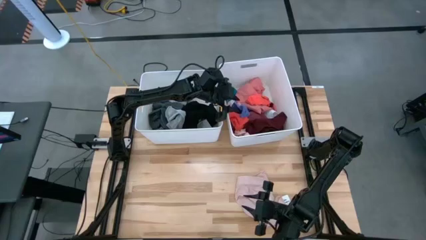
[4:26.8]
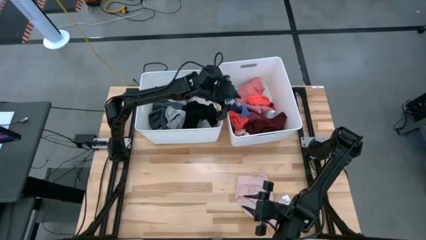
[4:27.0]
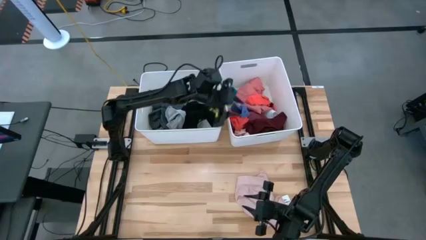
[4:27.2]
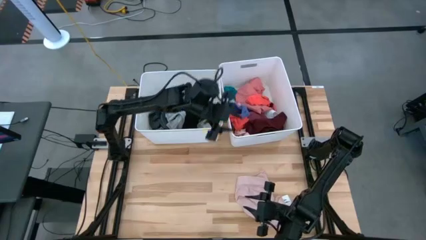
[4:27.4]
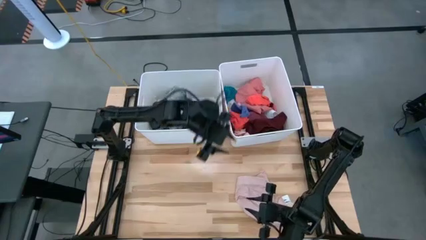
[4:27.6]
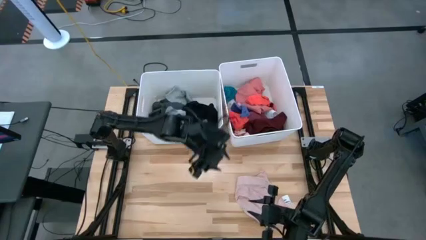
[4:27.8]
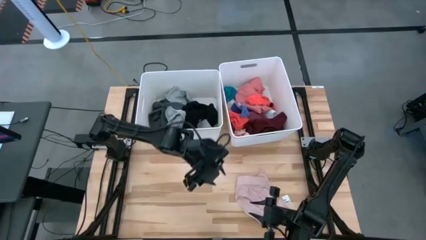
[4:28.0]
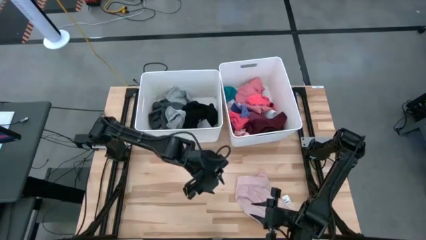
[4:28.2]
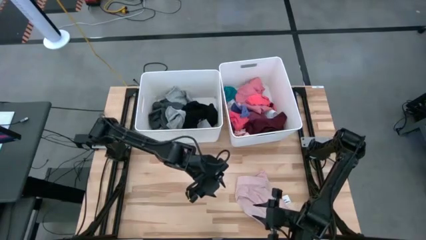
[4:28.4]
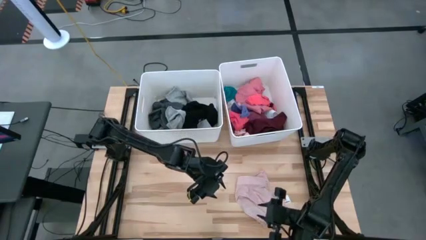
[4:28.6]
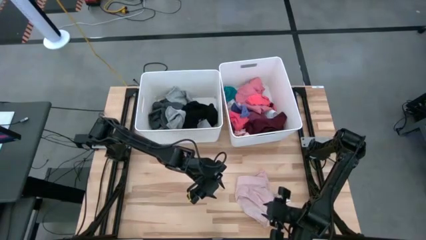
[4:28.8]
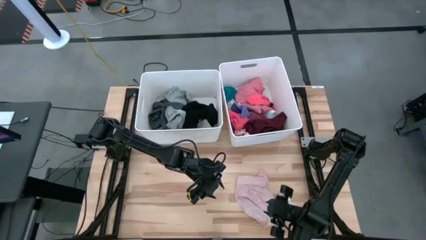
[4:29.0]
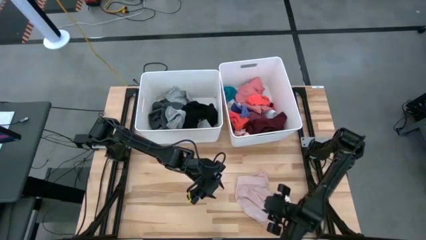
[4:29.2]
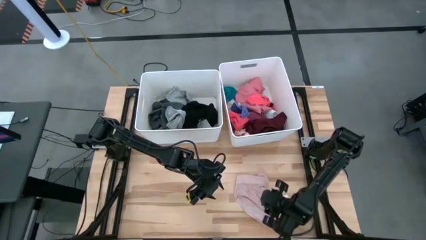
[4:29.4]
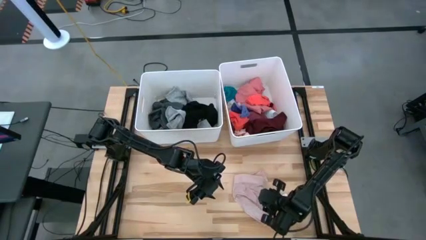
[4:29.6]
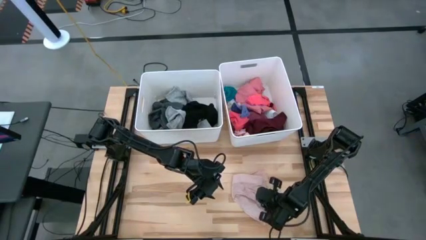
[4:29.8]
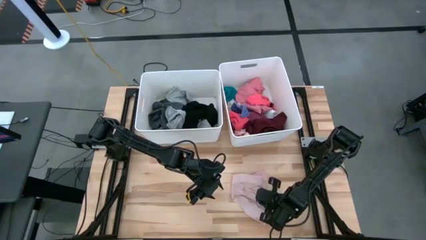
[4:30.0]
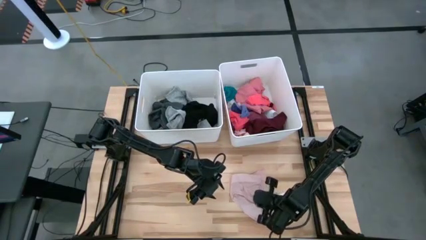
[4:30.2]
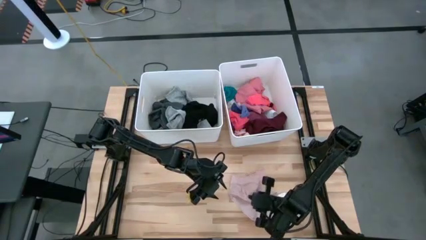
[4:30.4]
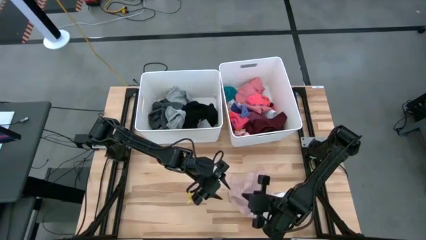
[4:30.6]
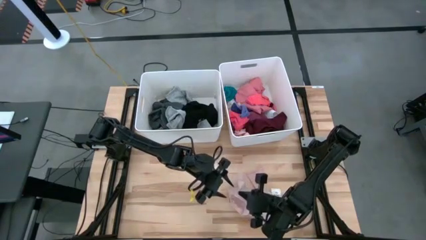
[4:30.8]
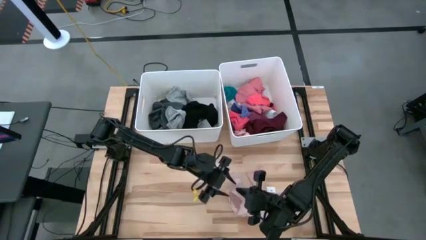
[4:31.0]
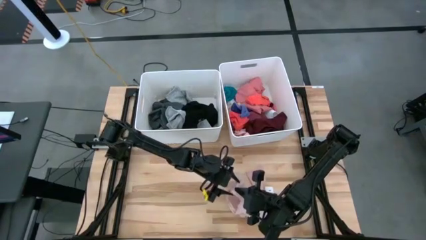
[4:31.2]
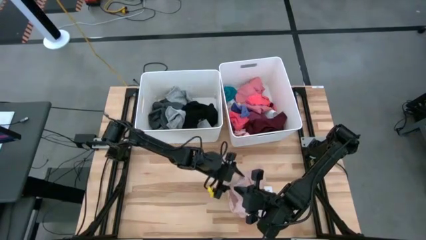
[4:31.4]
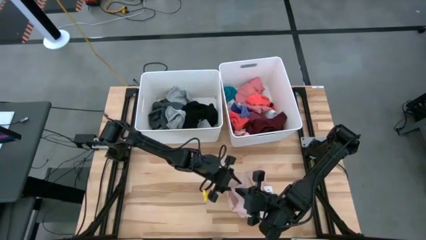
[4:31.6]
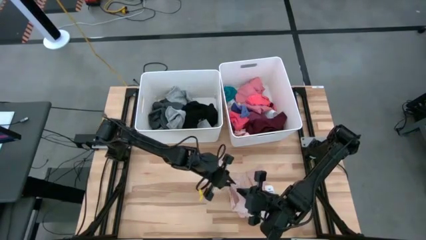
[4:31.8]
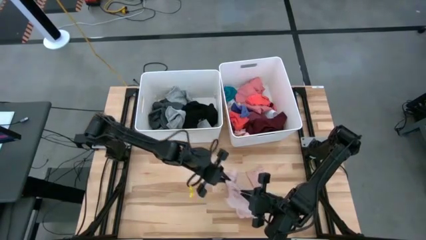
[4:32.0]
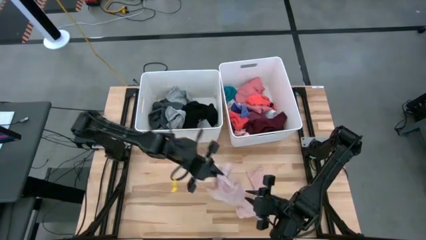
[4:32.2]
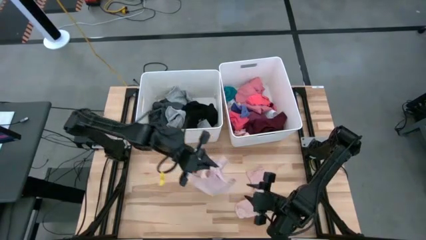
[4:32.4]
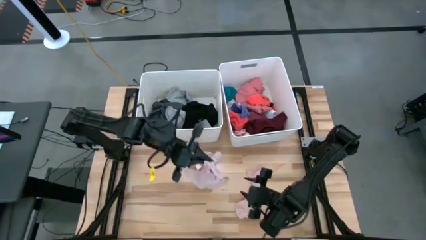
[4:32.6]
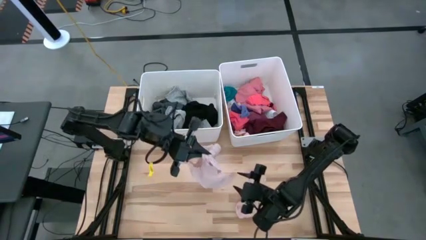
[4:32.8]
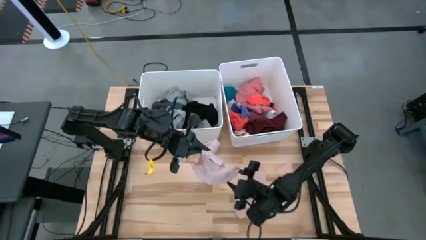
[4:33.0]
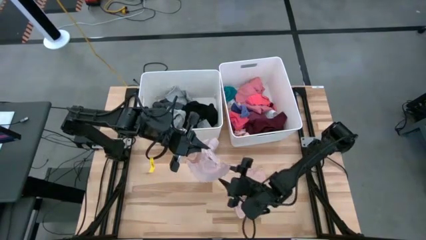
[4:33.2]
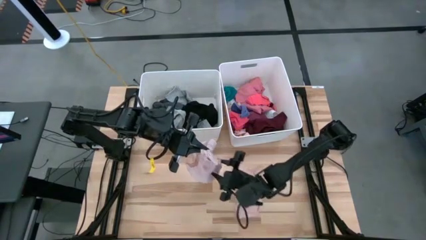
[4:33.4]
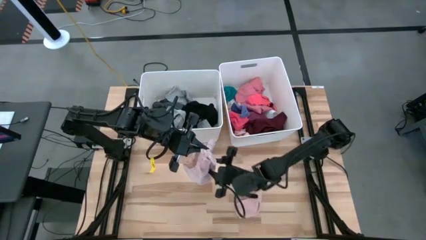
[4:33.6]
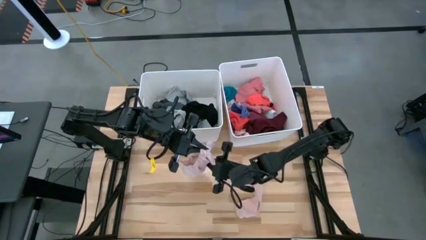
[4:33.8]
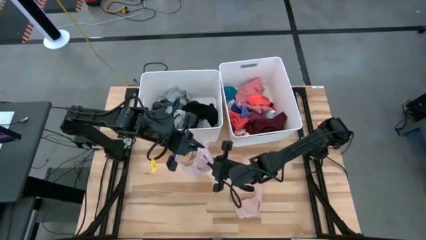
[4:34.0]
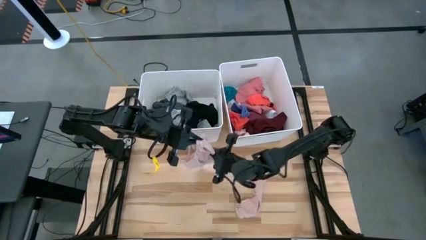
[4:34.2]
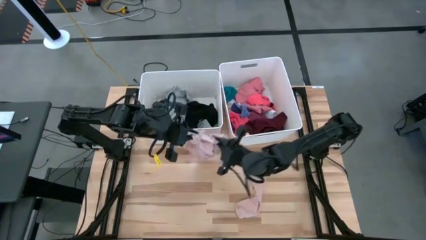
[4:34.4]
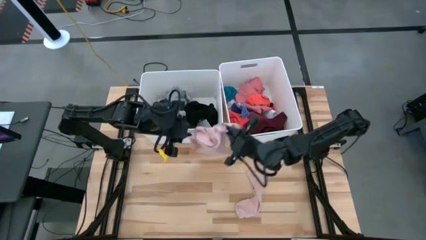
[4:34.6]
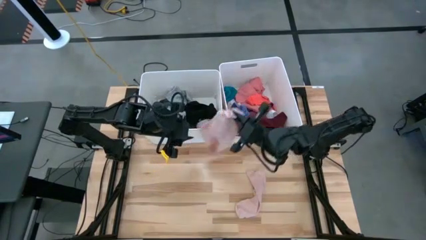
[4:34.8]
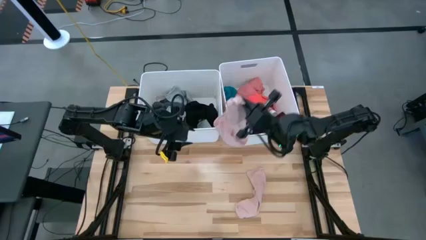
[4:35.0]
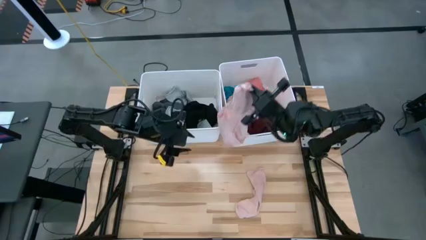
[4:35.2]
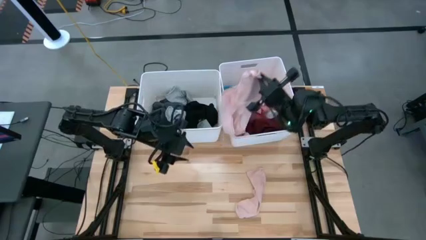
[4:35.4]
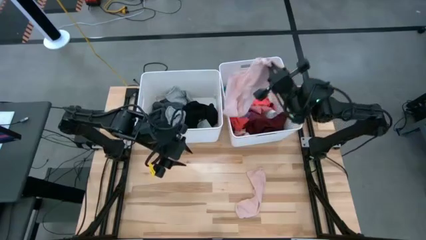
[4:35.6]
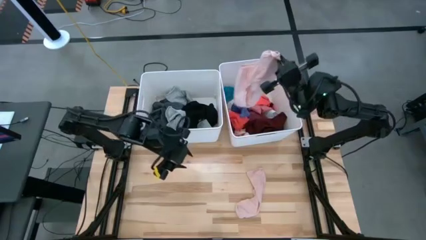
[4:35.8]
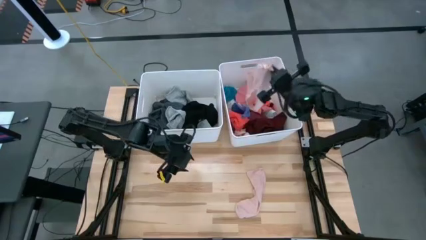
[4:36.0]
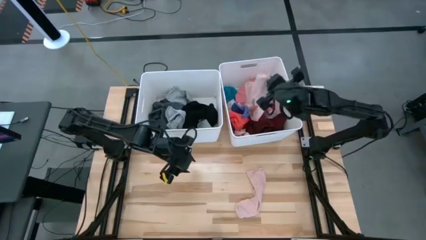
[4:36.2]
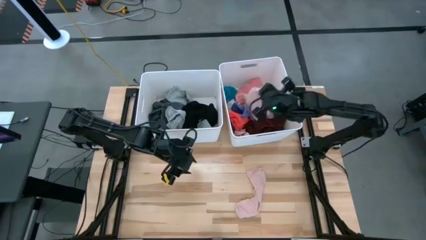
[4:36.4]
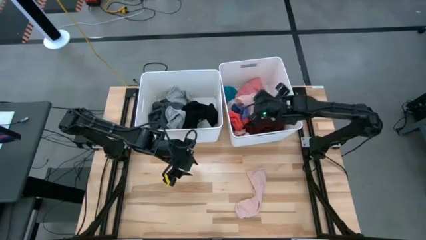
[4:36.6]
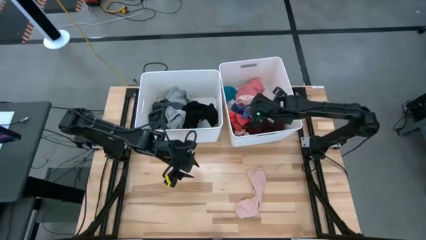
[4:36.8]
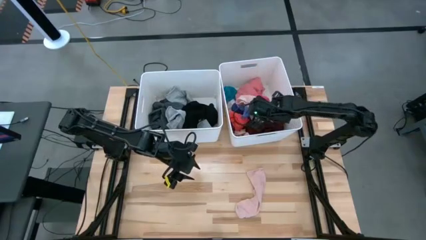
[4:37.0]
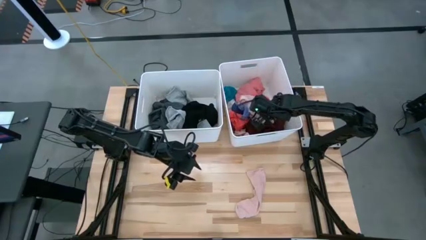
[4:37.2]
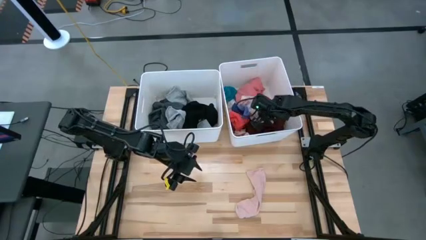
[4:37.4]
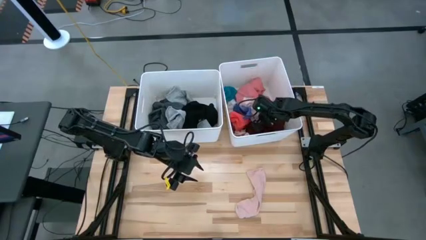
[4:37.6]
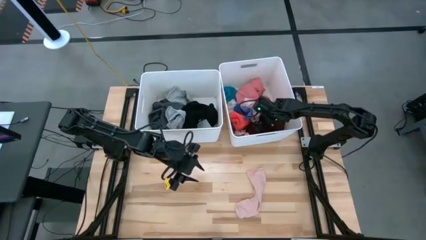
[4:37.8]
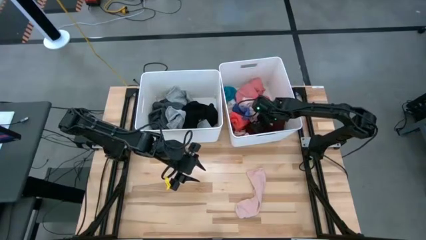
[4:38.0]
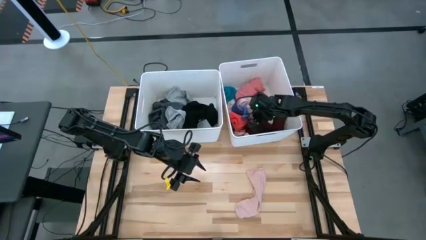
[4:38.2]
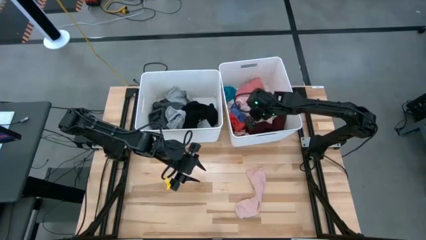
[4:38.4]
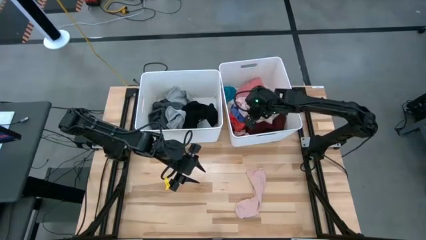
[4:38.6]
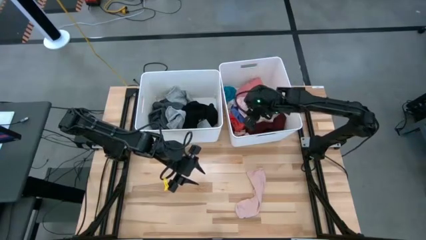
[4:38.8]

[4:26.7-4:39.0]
Task: Sort clothes
Put the pink garment into the right white laundry organizer
